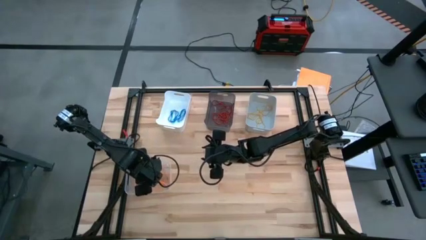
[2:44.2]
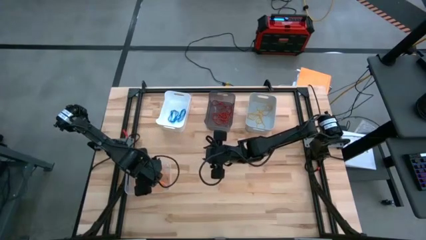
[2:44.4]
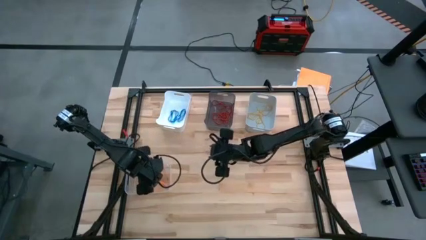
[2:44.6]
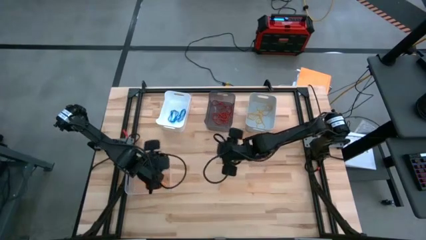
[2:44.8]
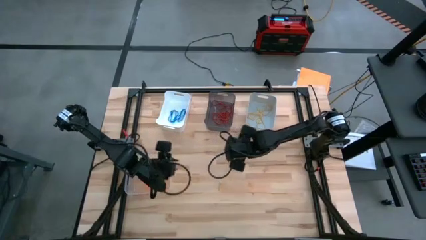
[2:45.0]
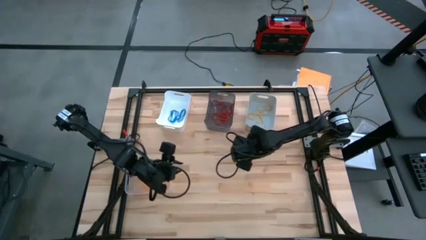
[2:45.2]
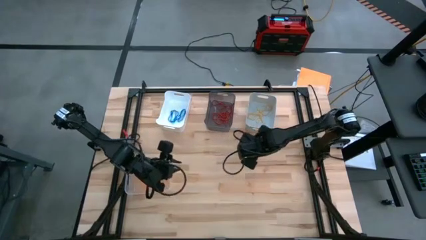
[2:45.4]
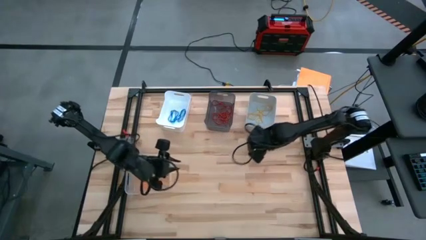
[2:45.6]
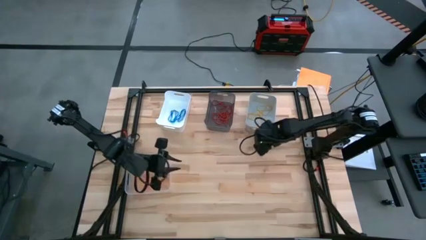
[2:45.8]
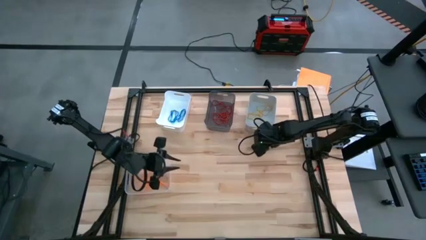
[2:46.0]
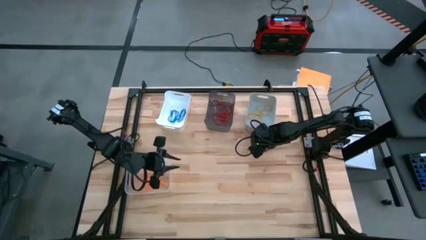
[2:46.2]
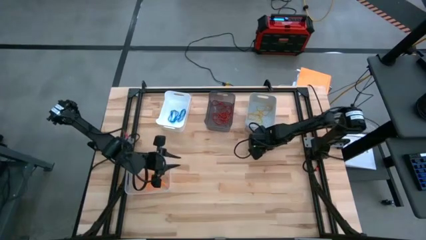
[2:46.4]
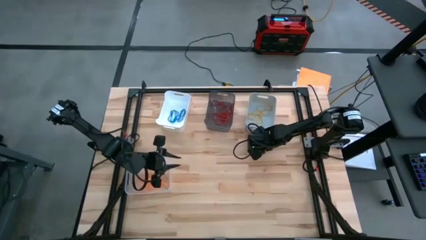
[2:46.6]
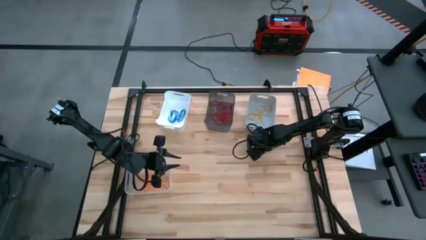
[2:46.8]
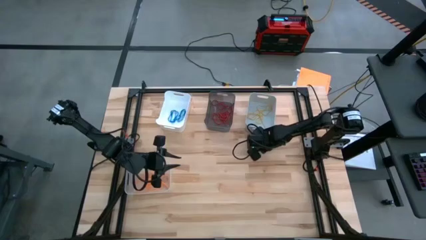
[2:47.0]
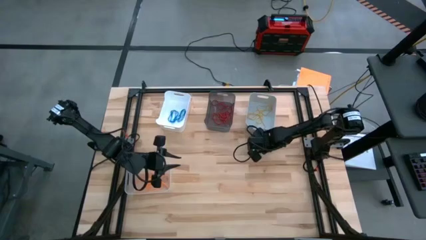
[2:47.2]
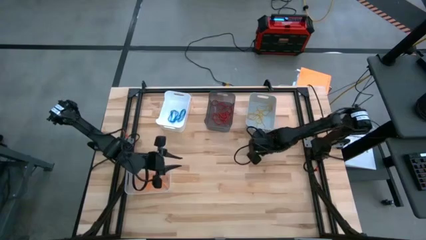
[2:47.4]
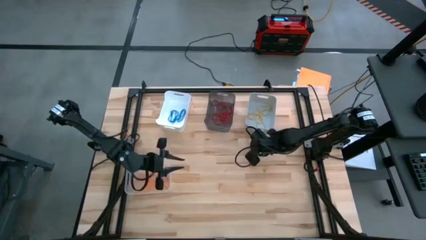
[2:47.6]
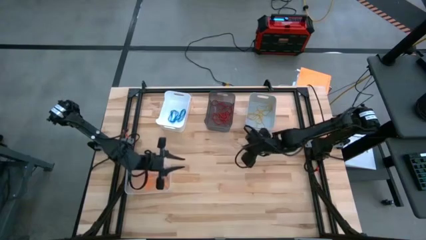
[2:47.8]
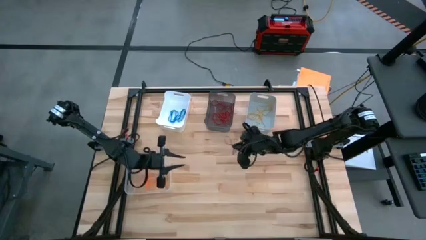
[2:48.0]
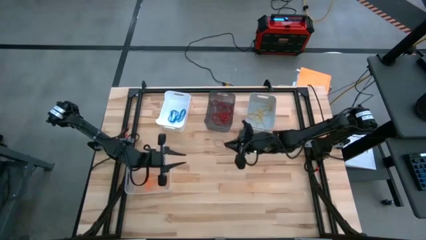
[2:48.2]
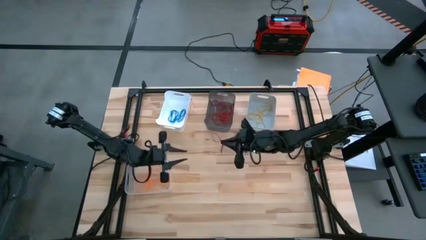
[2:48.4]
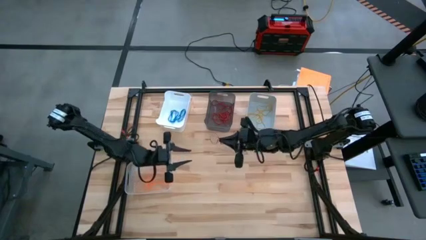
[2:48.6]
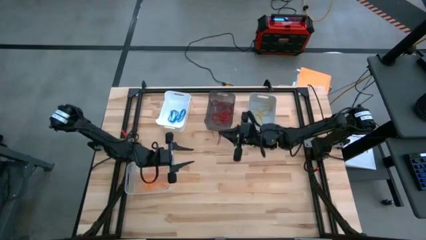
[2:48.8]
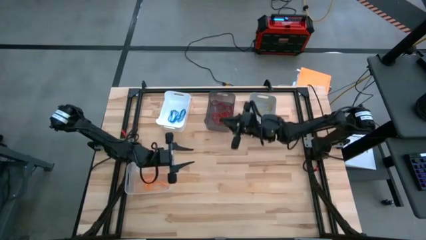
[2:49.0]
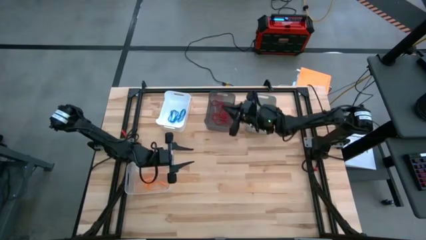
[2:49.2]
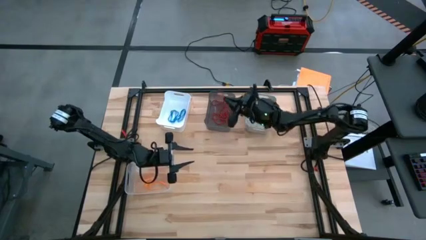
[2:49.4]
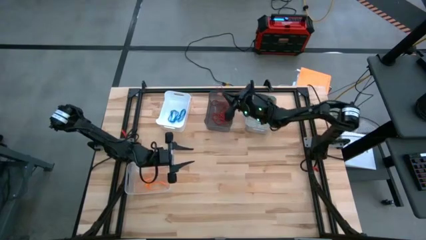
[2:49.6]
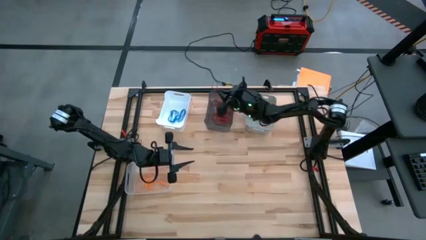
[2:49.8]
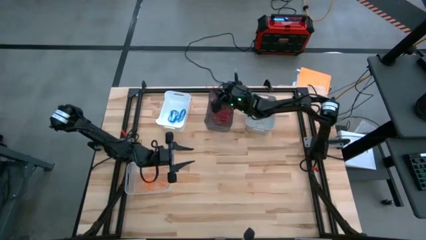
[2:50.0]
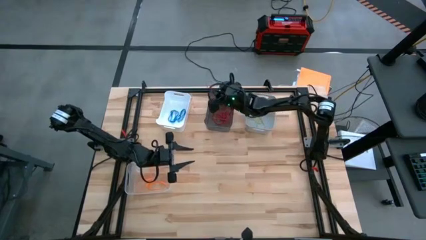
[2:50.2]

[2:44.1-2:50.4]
Task: Sort rubber bands into baskets
Put the red rubber band into the black bin

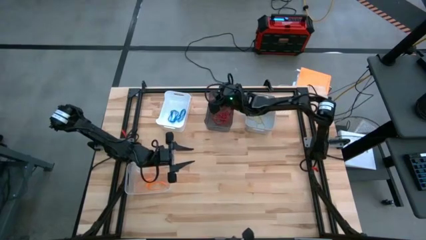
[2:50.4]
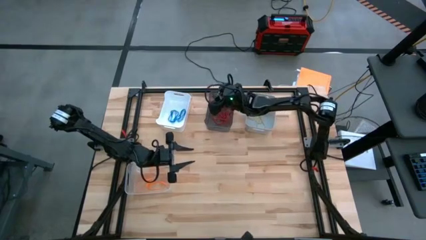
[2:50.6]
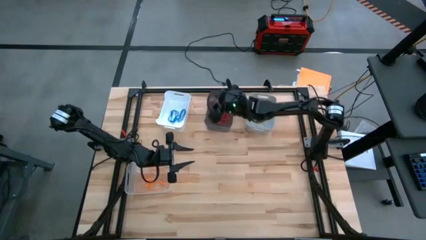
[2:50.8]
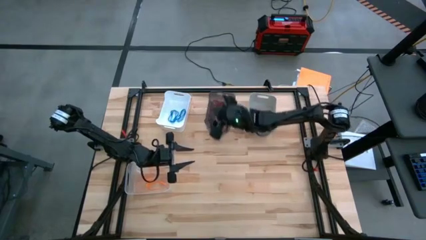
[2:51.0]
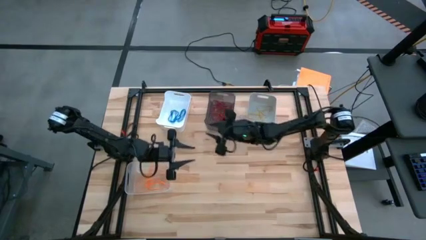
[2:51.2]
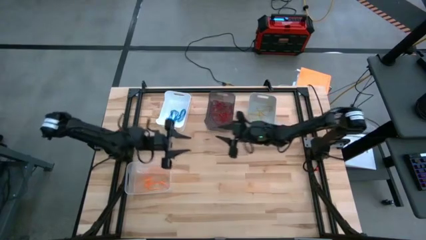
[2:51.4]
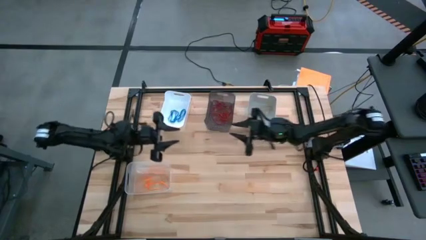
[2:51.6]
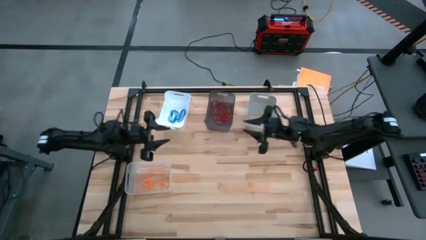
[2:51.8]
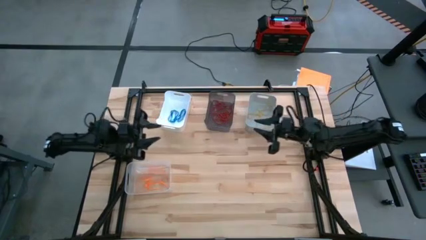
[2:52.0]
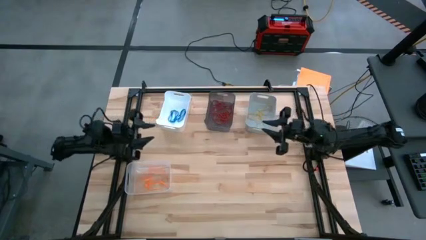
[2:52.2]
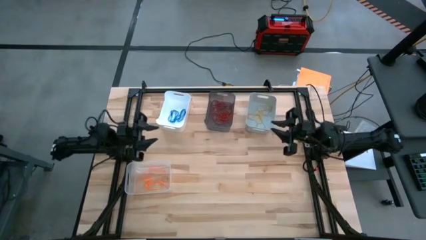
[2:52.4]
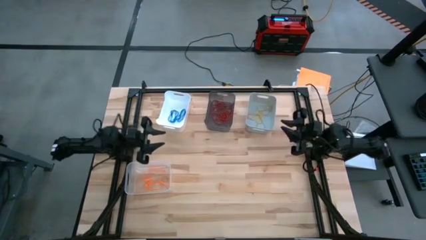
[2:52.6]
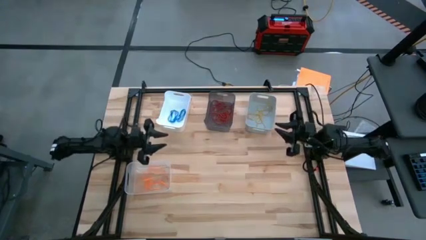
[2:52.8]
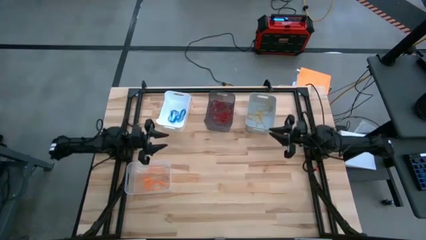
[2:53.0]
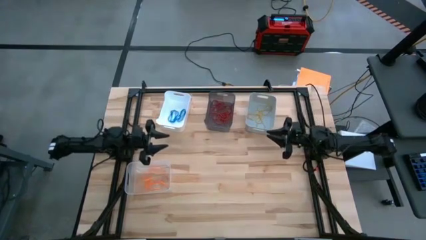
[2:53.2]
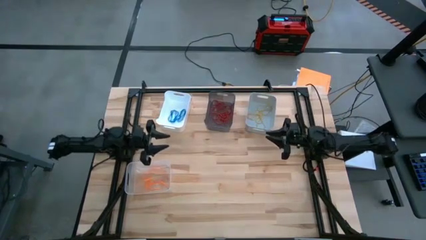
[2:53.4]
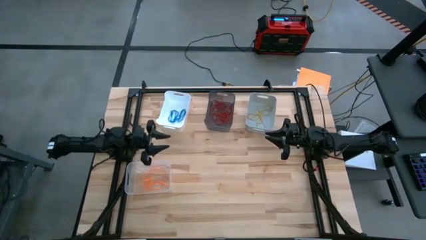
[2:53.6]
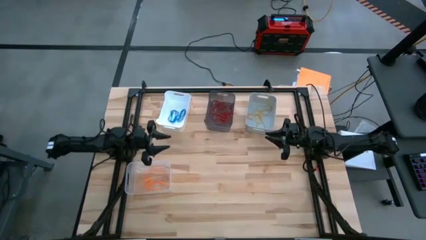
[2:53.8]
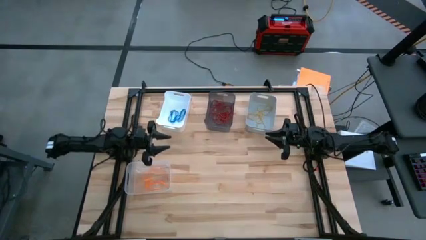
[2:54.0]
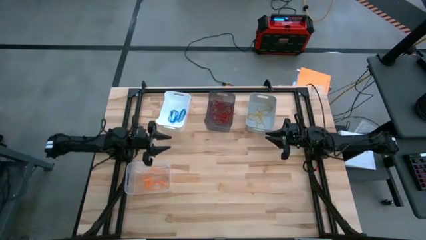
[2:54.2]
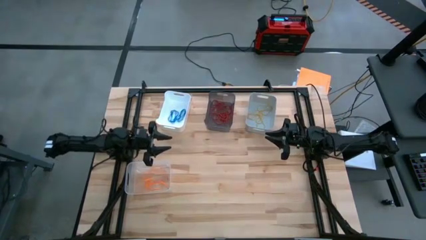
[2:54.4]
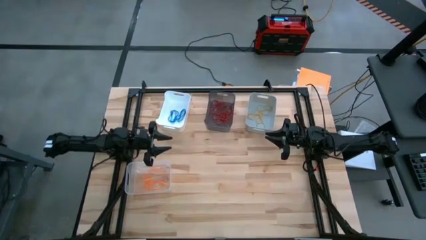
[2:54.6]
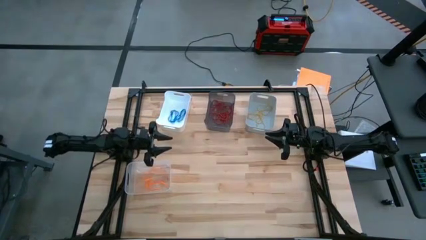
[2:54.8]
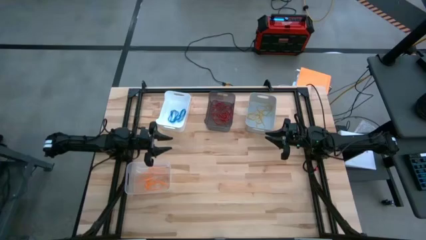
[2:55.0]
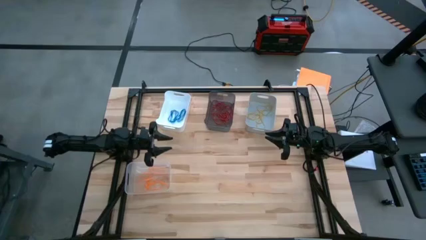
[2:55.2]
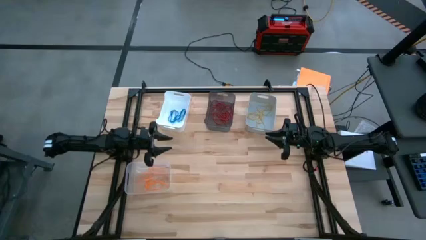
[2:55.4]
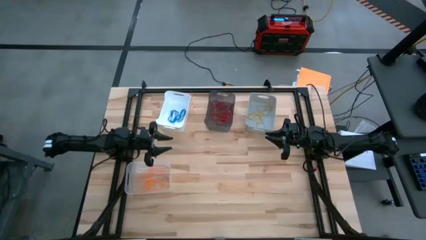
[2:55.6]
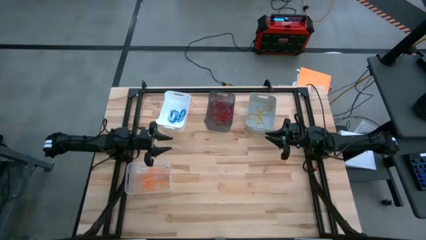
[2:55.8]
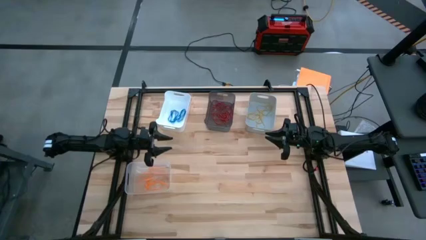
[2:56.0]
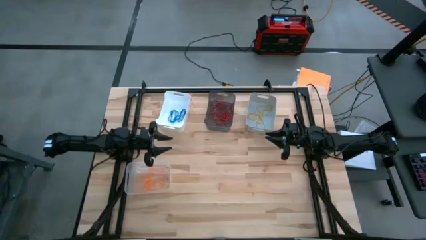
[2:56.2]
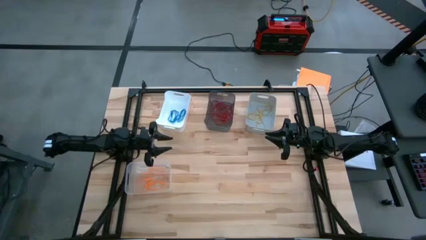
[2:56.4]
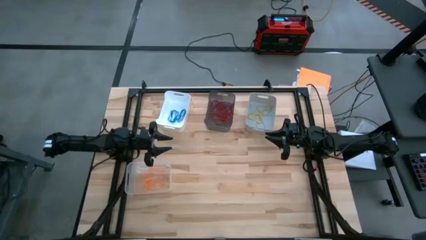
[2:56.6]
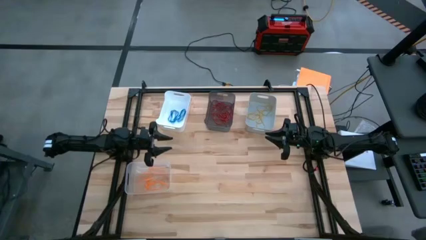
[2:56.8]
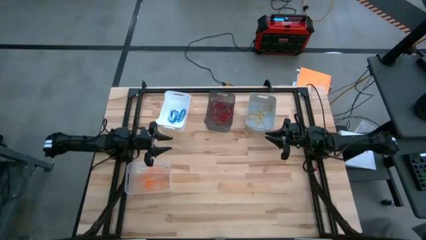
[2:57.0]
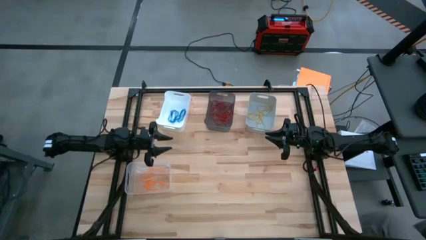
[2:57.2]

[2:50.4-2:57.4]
Return to Home Position

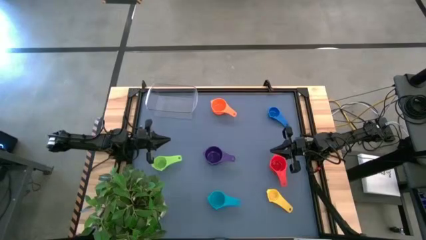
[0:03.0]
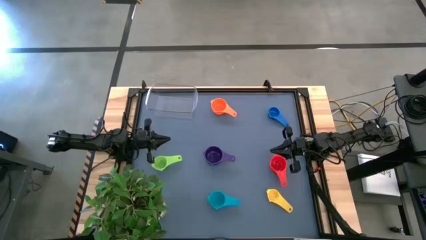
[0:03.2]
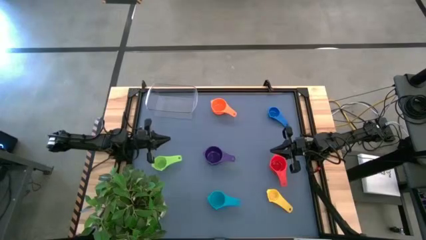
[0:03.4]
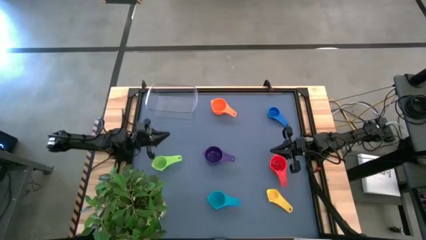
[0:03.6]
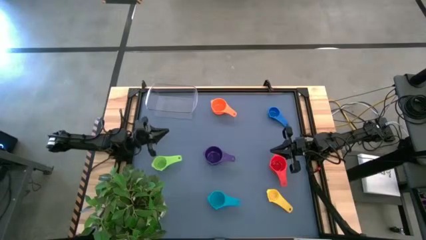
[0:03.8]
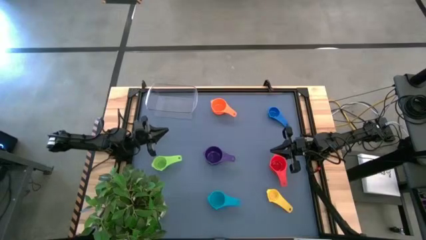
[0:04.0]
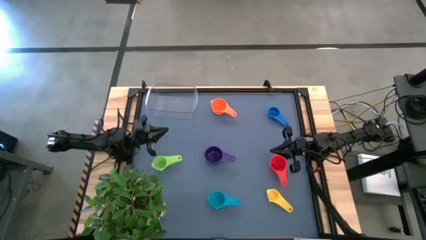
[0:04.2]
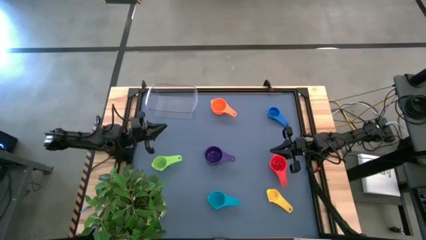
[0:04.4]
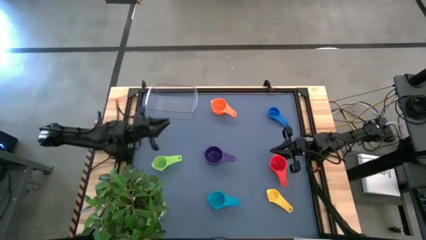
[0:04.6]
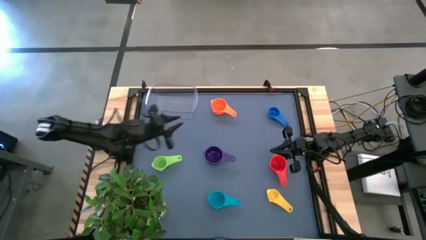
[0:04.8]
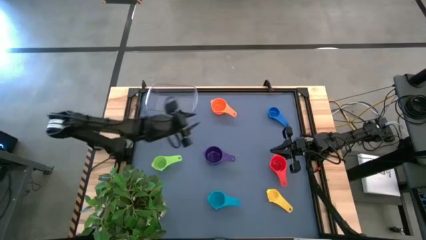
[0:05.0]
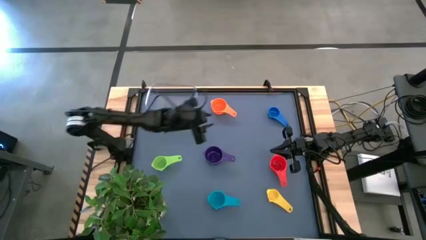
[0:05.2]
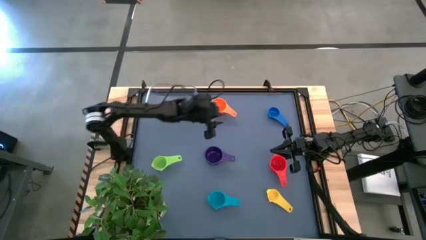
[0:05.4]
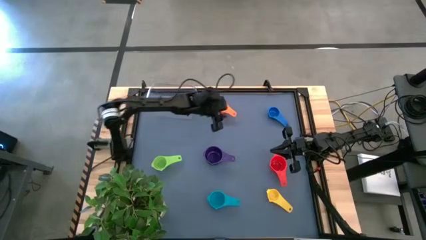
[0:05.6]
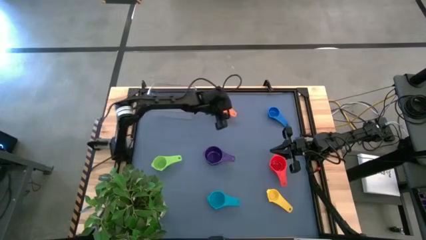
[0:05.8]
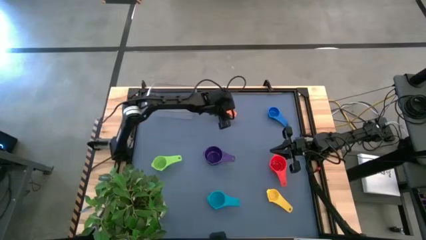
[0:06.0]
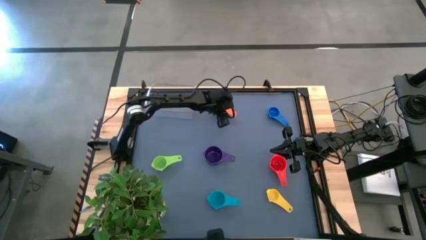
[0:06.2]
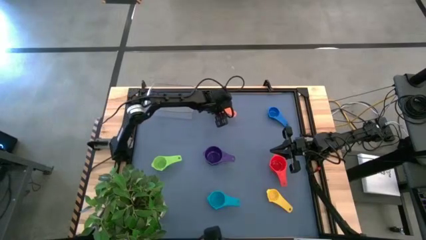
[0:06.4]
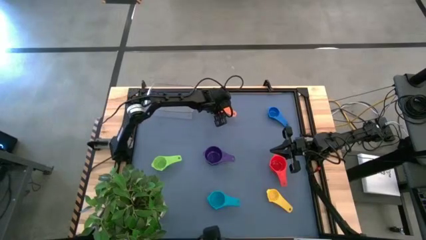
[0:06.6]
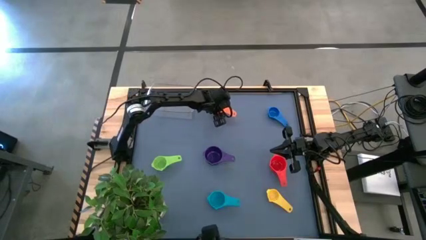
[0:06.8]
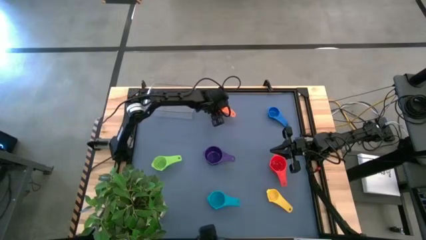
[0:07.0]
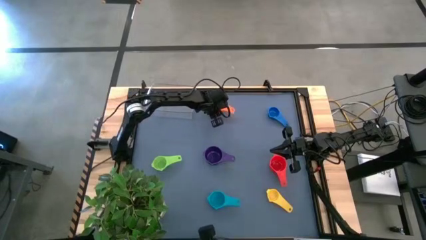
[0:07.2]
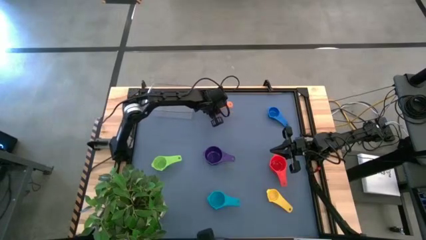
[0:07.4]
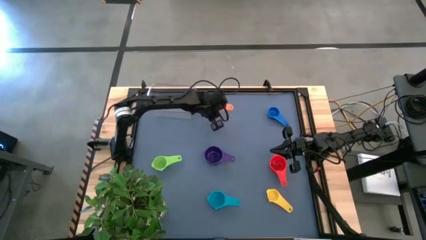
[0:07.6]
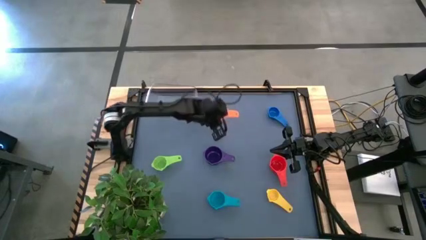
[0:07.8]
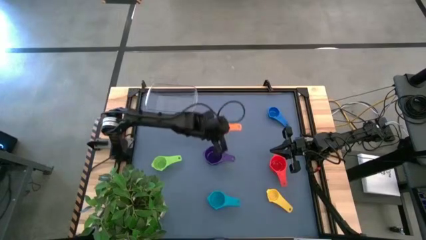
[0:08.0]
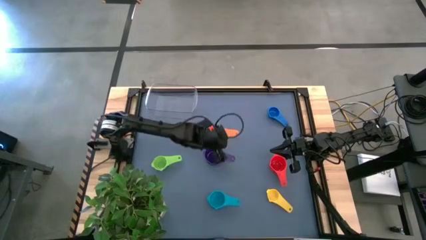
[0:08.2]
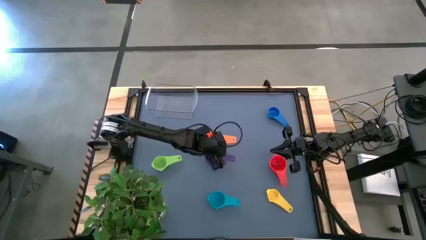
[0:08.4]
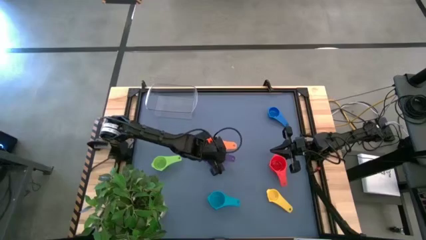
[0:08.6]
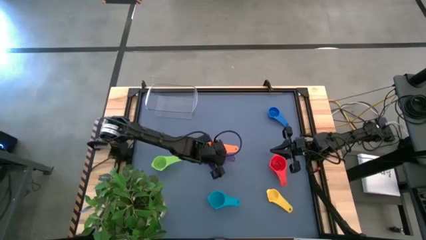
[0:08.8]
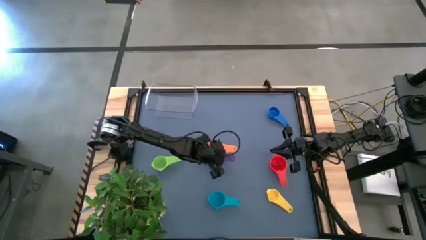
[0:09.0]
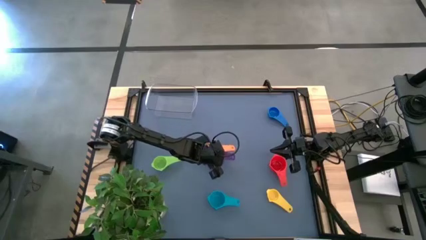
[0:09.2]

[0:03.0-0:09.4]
Task: Nest measuring cups in basket
Stack the orange measuring cup on top of the violet measuring cup
